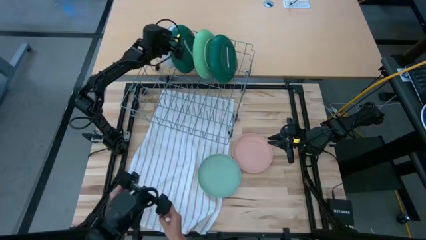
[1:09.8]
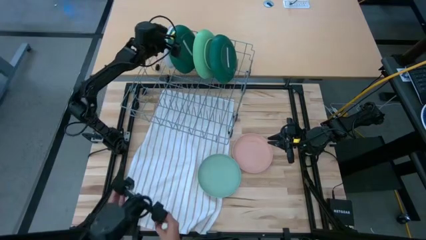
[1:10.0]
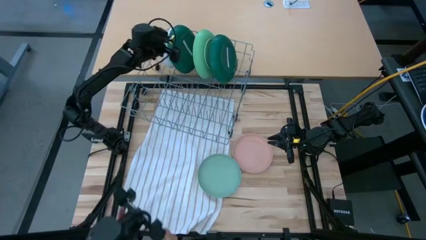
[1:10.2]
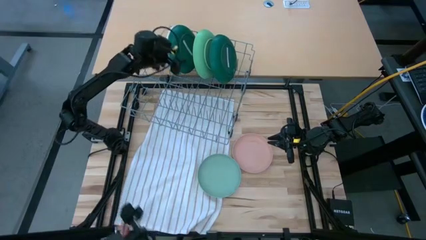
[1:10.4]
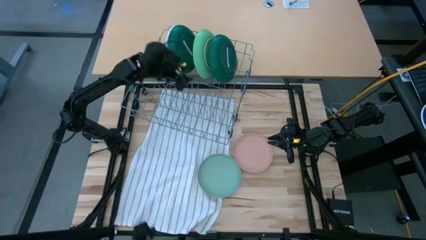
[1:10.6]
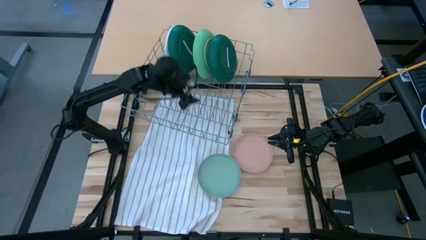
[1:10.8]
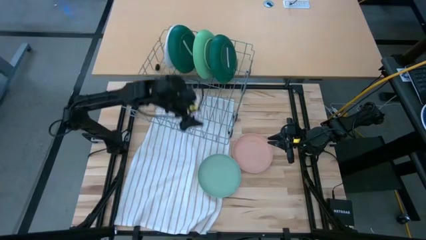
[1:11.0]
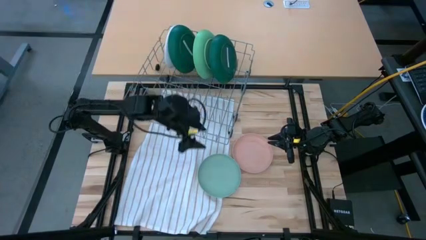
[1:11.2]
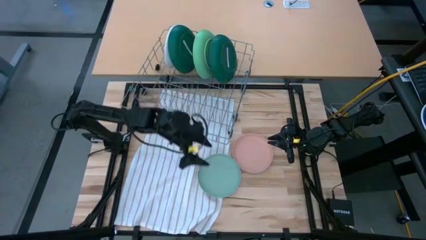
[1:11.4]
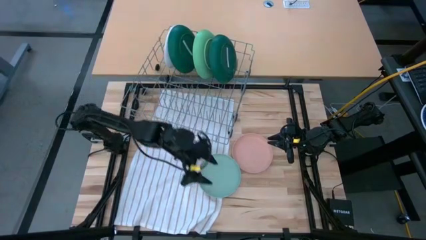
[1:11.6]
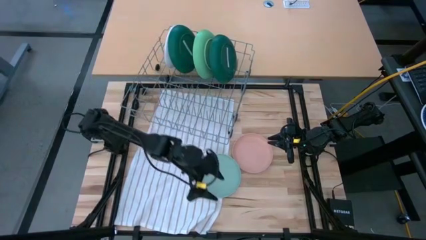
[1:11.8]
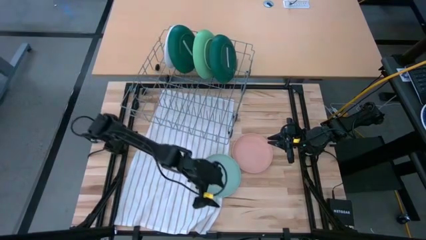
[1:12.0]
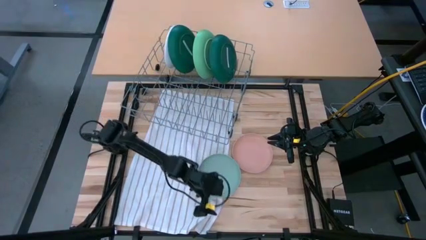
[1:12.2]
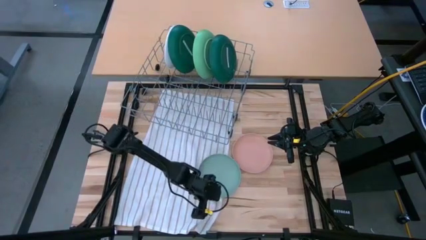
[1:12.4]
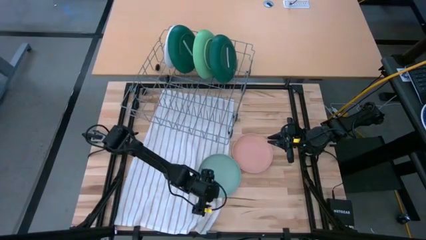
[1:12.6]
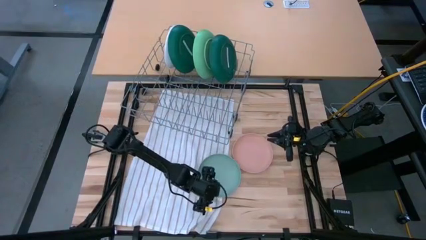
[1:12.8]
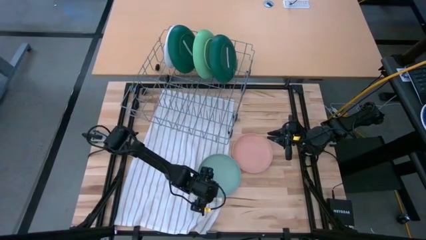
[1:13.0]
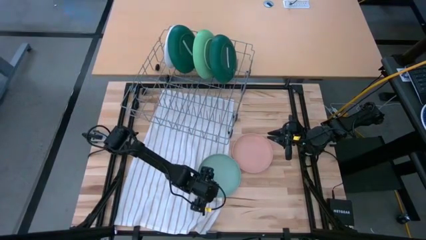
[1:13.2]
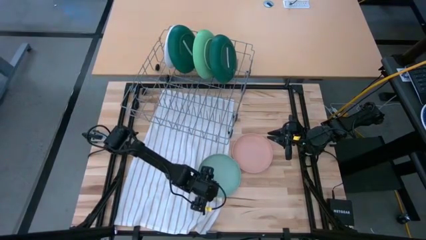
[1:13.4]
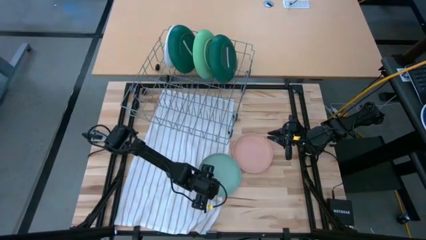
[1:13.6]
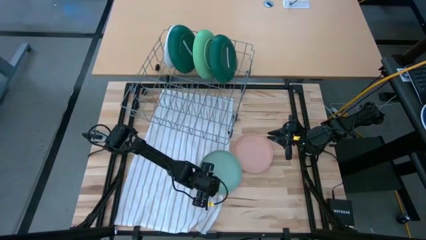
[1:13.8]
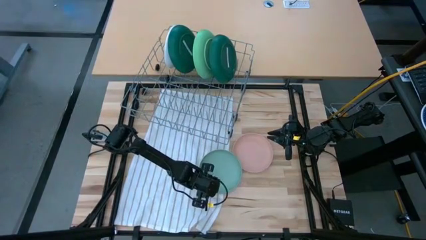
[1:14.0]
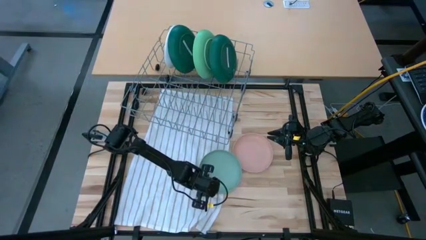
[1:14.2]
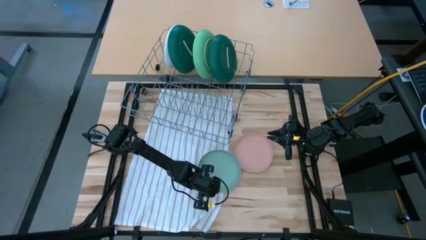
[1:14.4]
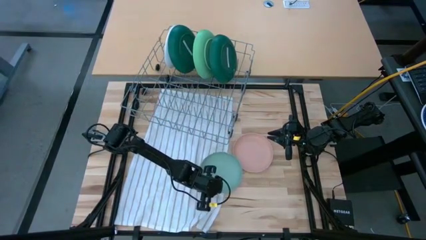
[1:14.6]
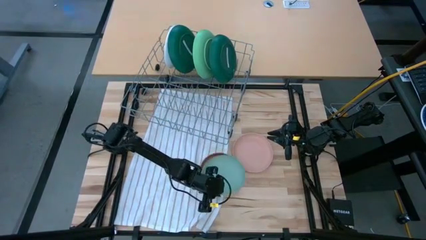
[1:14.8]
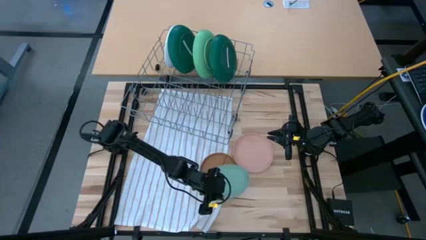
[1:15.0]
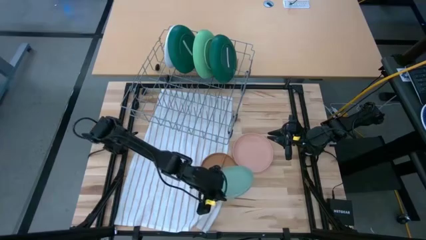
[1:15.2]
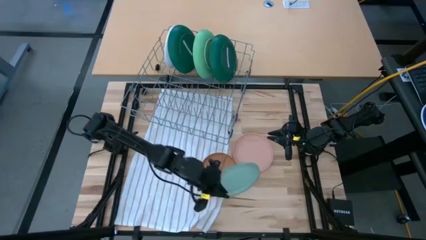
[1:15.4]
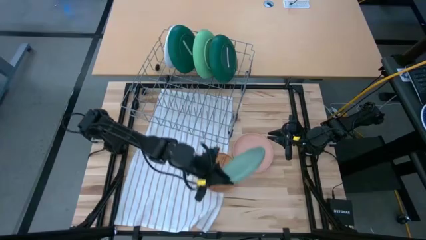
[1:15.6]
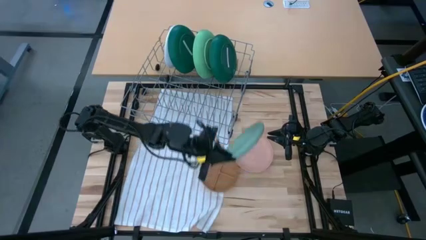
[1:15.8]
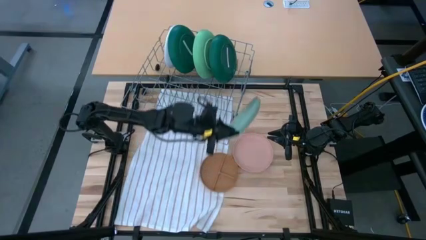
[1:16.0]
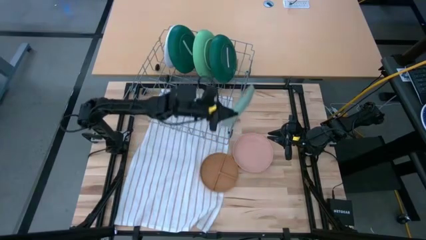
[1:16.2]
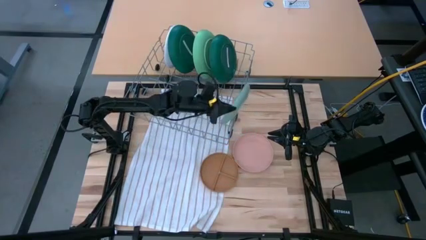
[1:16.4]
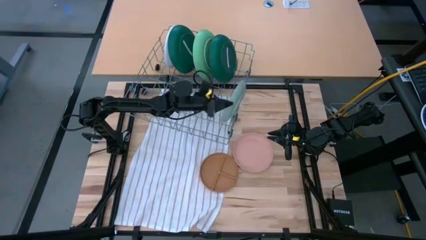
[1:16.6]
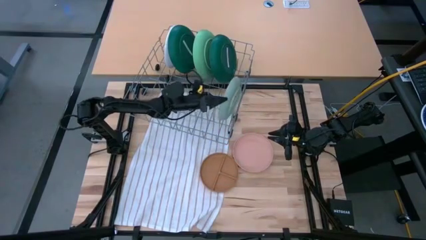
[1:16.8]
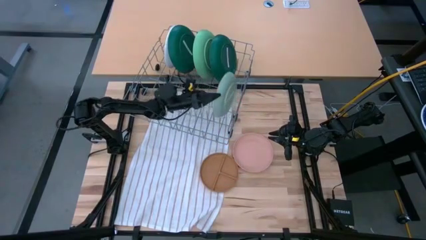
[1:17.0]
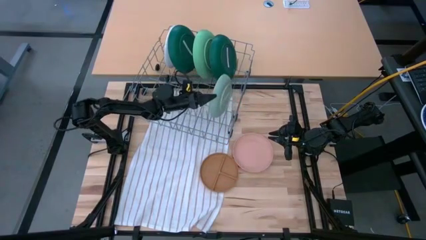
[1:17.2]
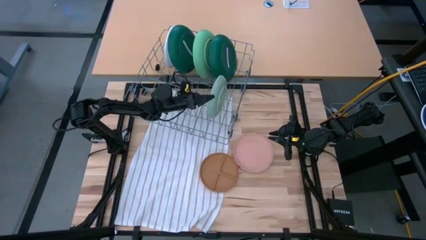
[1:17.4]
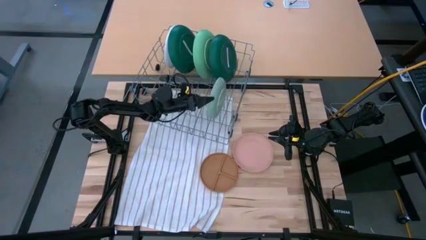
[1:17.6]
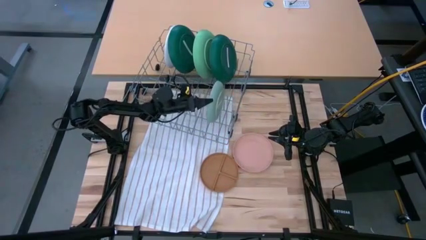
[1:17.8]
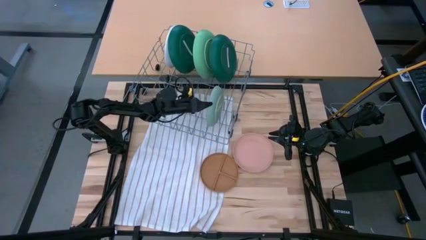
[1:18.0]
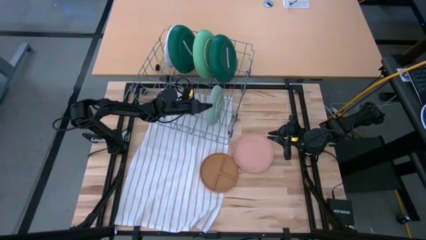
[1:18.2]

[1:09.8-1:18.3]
Task: Sort dishes
Put the light green plate into the dishwasher rack
